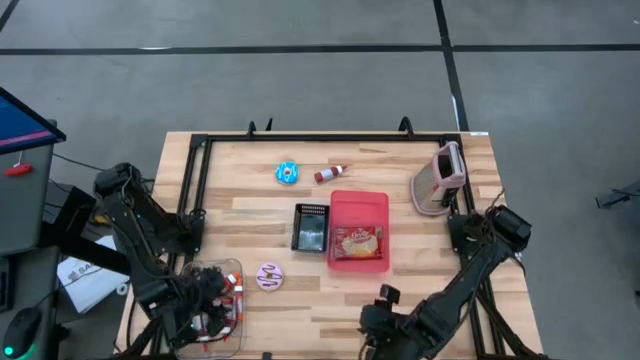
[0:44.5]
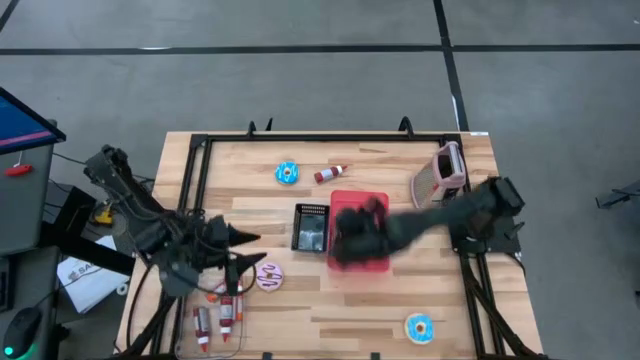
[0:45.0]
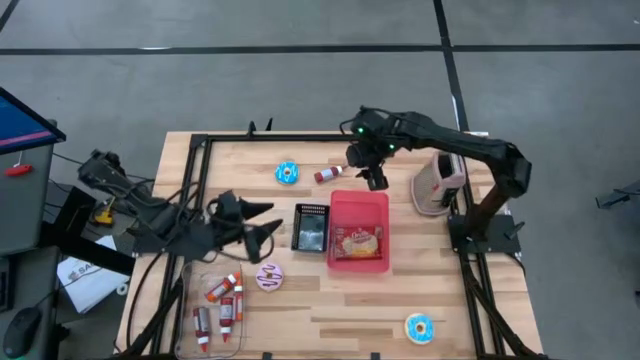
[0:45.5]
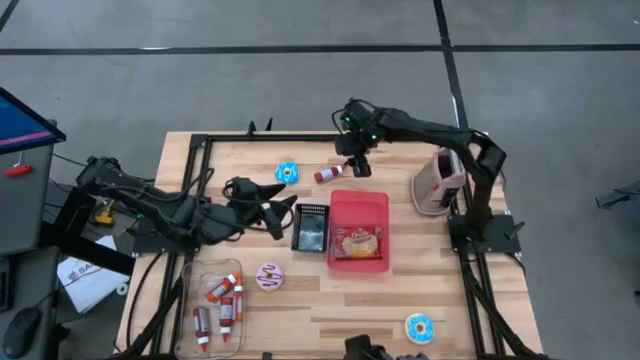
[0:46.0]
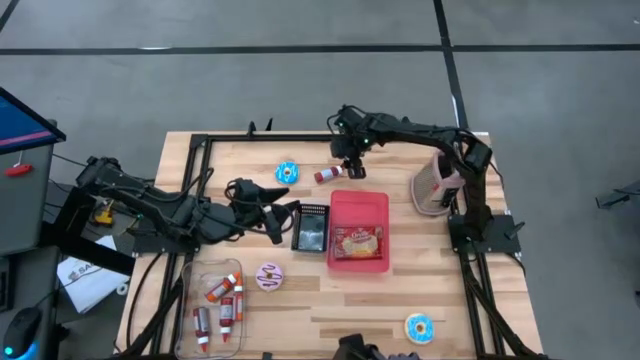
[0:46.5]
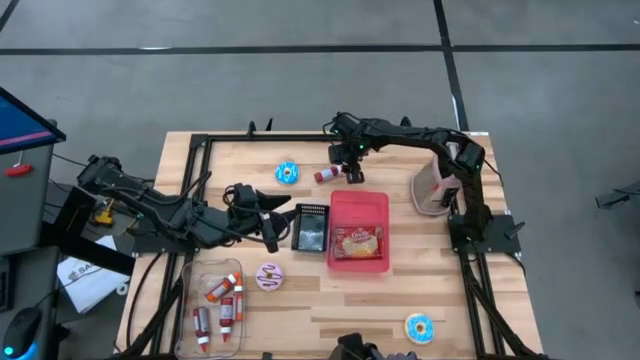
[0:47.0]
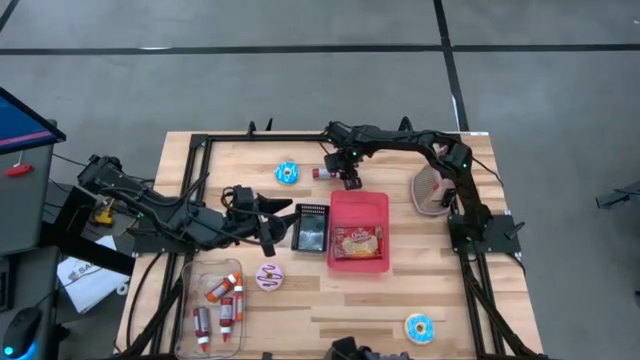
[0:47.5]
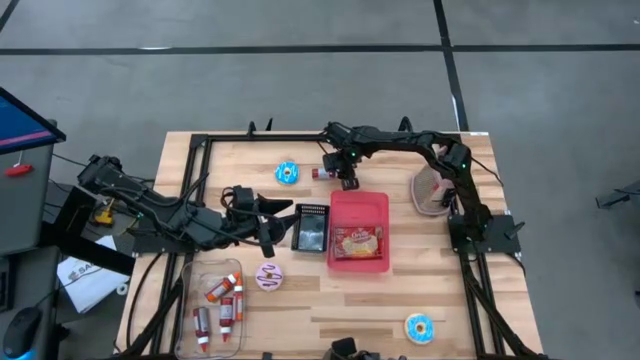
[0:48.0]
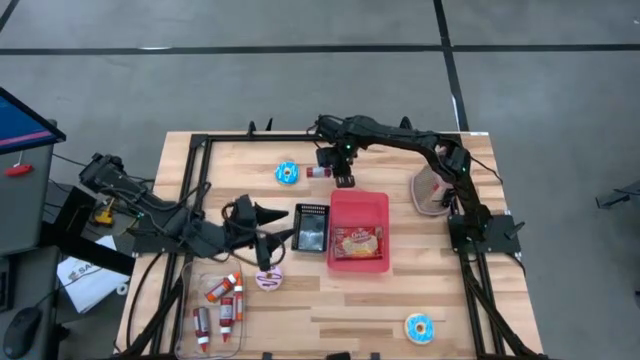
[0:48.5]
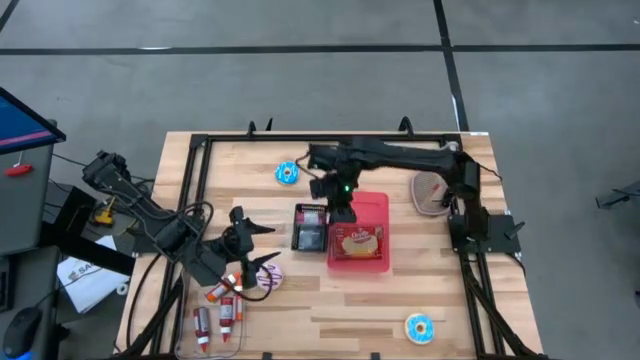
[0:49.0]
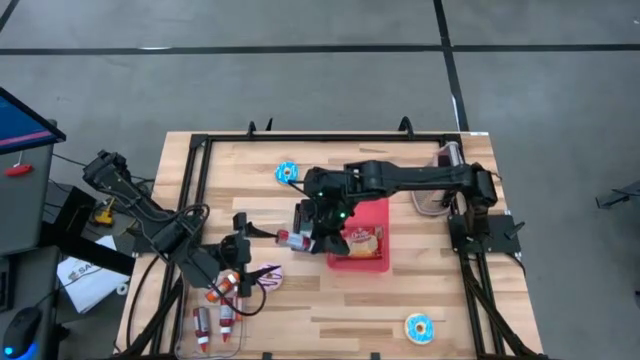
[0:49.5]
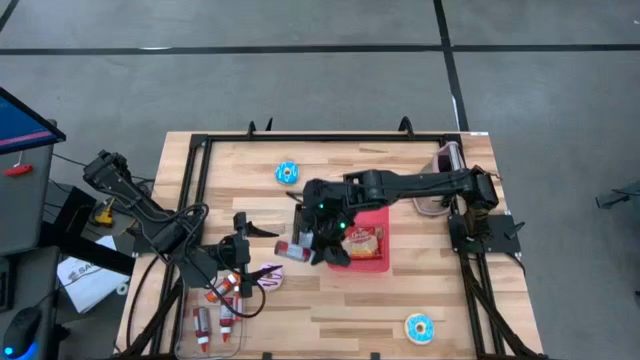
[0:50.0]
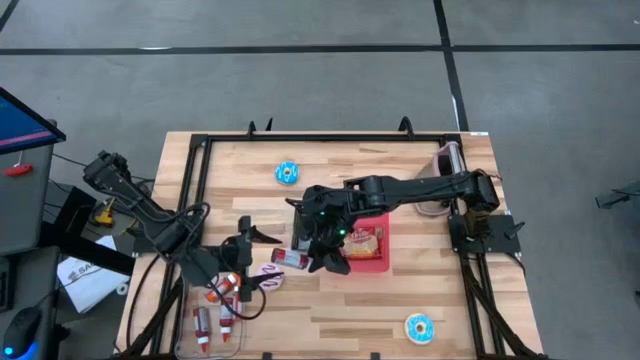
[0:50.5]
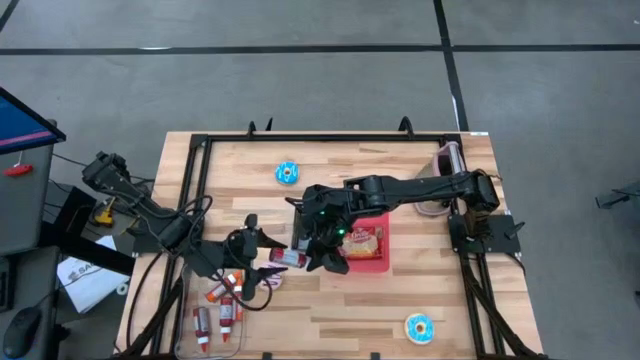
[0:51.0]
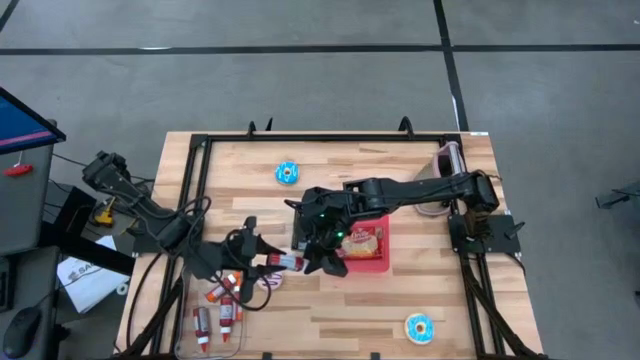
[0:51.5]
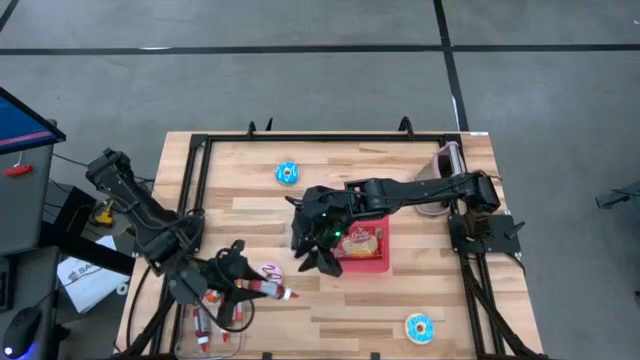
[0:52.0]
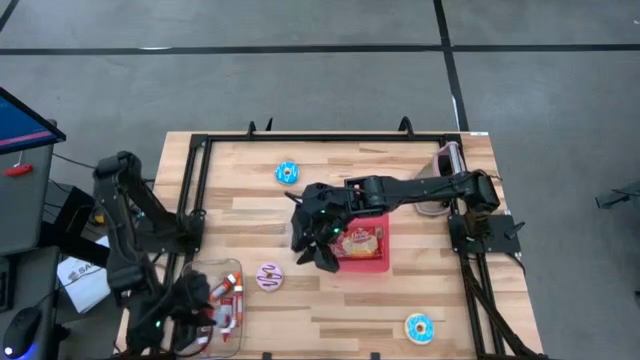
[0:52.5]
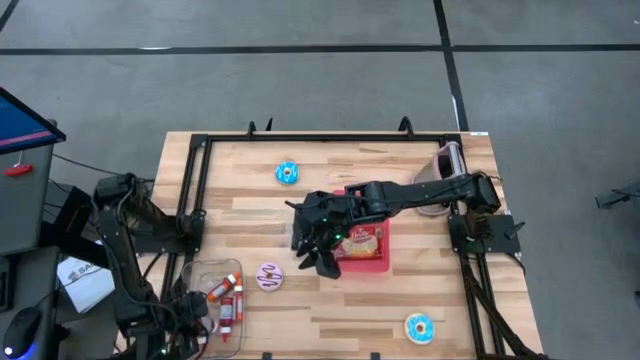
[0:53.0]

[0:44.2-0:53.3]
Put the red food coloring bottle into the transparent bin

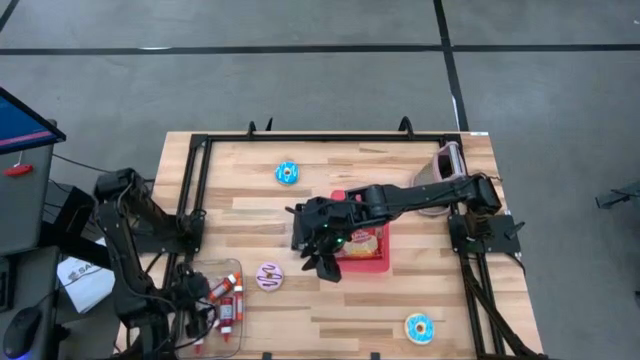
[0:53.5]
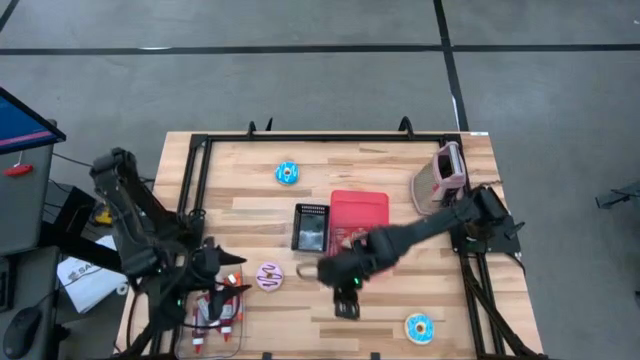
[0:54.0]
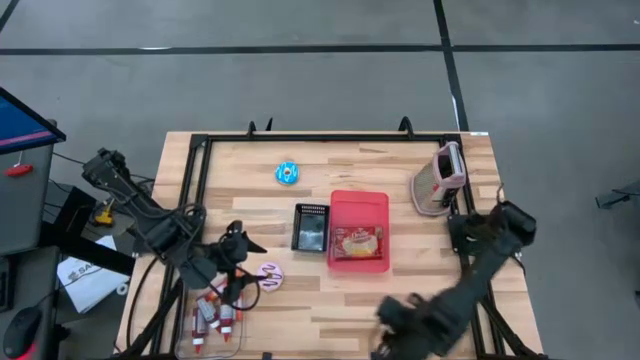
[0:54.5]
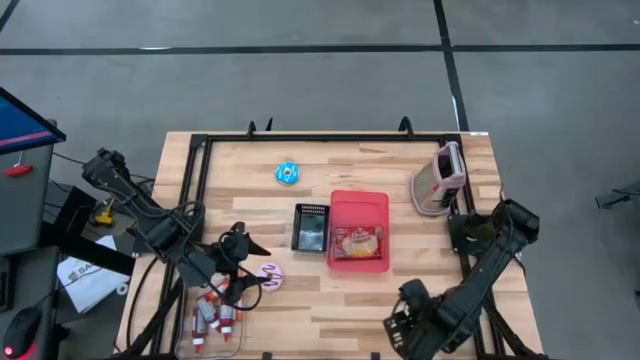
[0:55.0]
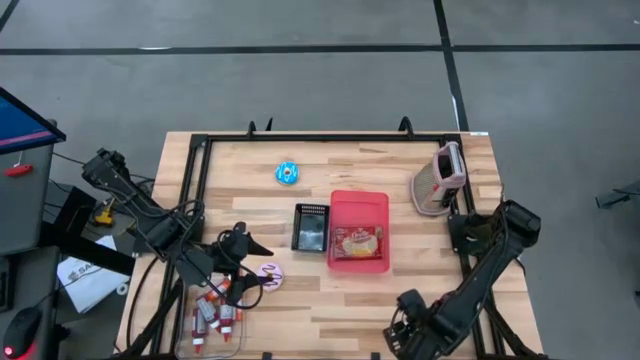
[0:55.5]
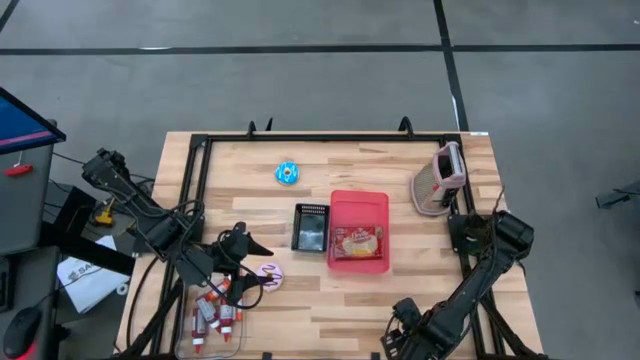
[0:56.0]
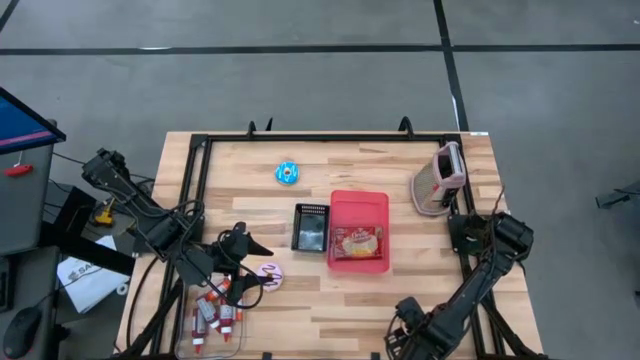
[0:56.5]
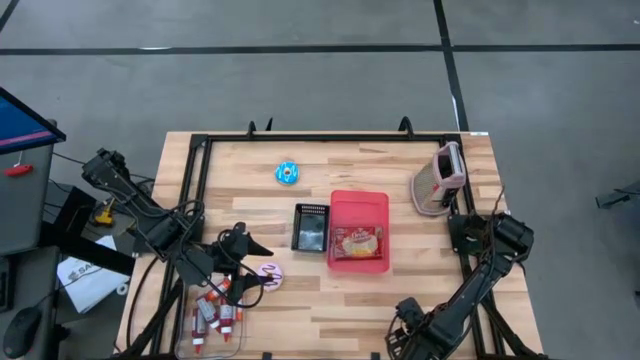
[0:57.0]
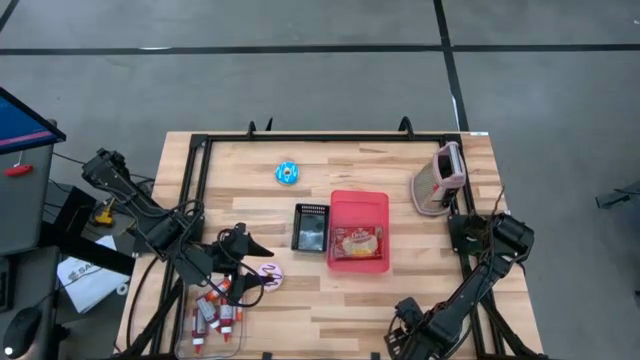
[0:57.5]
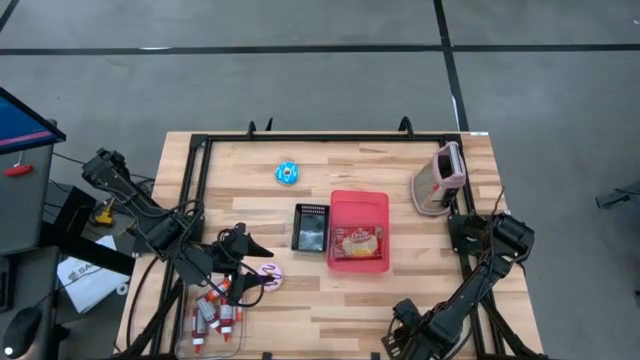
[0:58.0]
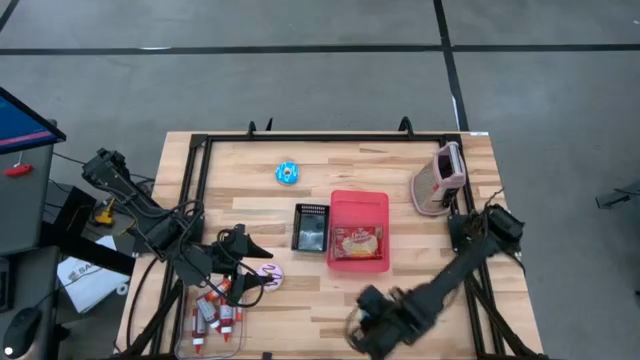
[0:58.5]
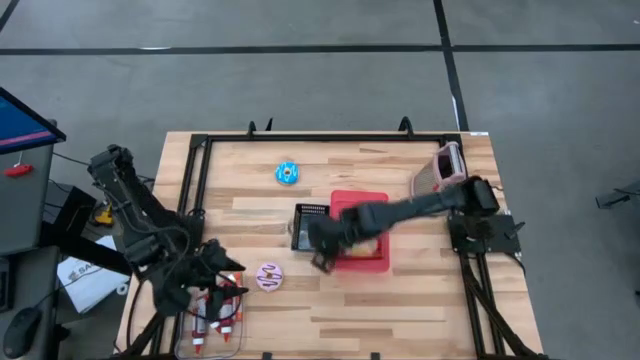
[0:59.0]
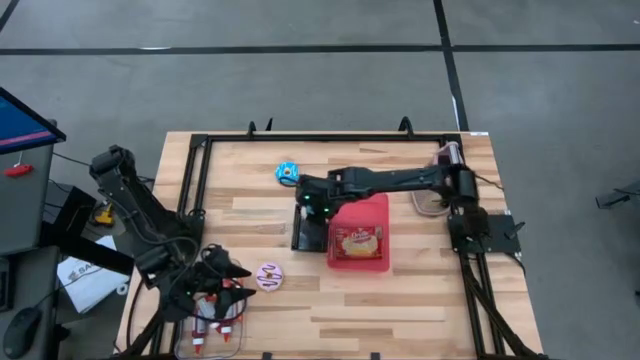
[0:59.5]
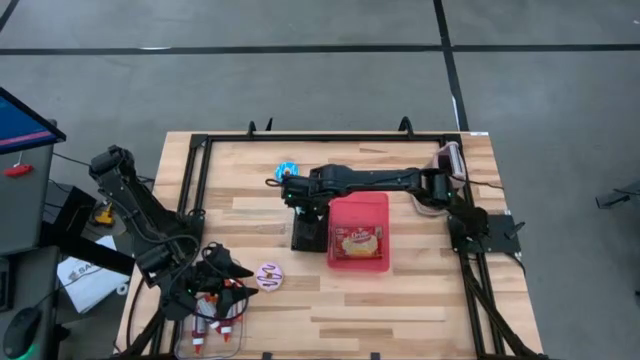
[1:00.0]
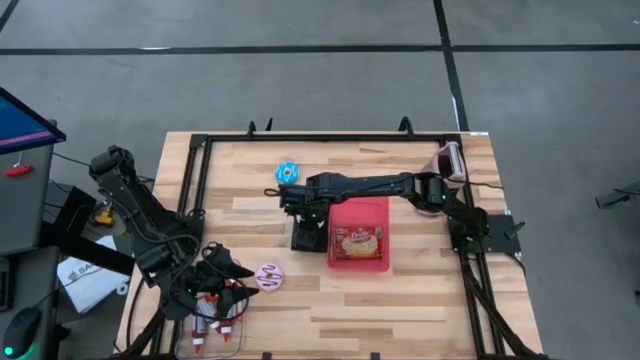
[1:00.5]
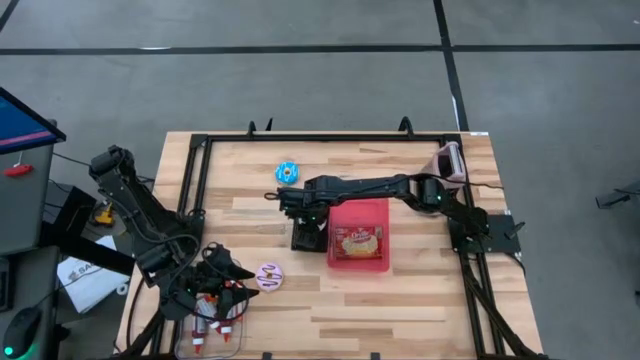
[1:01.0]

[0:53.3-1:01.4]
Put the bottom blue donut into the black bin
